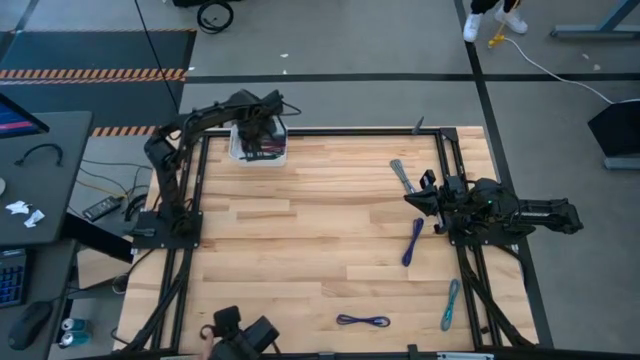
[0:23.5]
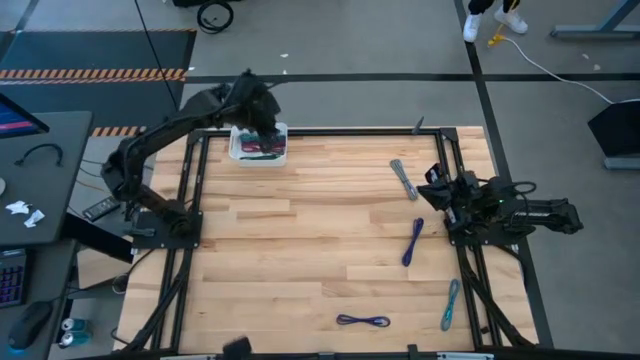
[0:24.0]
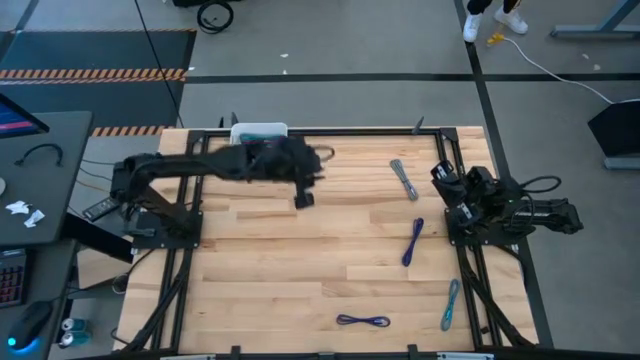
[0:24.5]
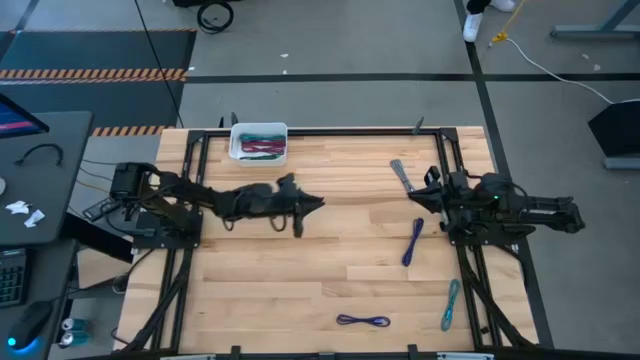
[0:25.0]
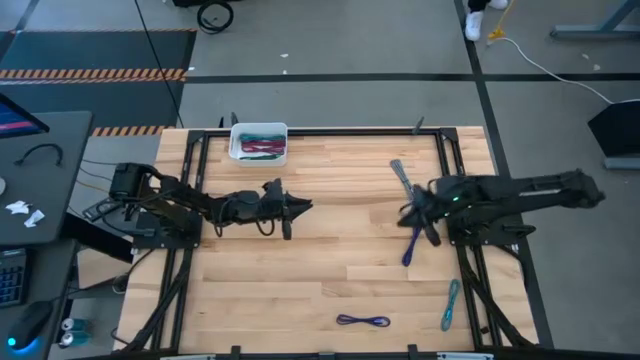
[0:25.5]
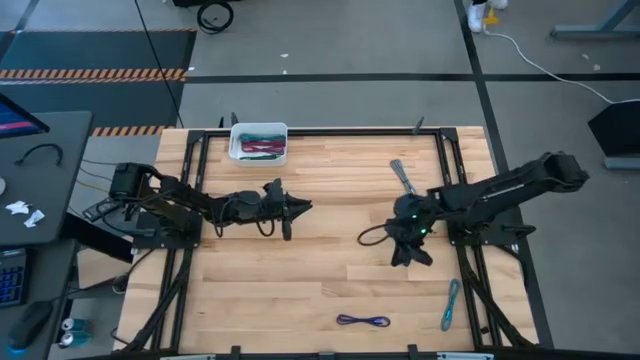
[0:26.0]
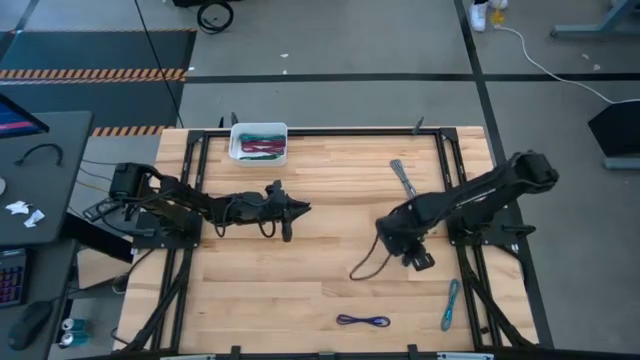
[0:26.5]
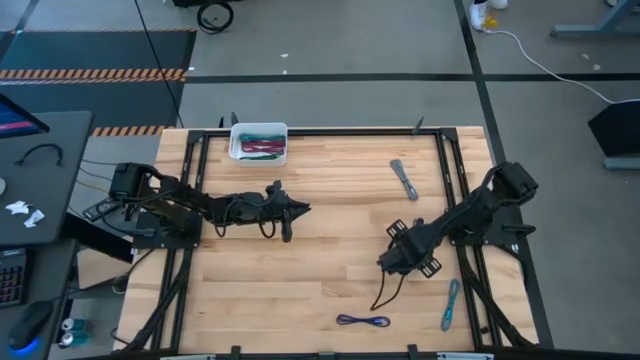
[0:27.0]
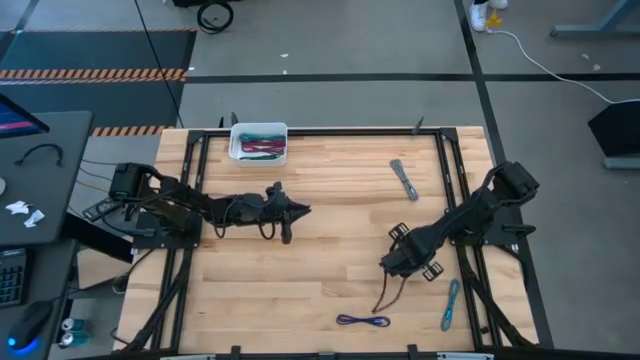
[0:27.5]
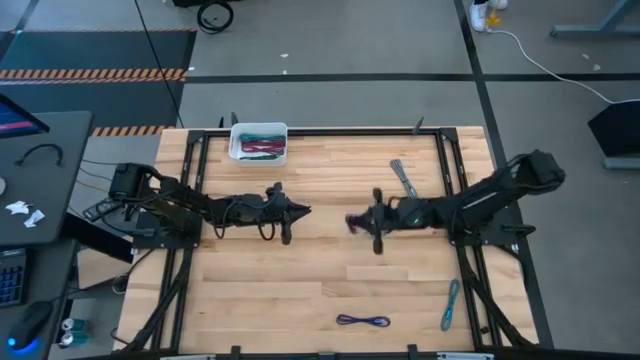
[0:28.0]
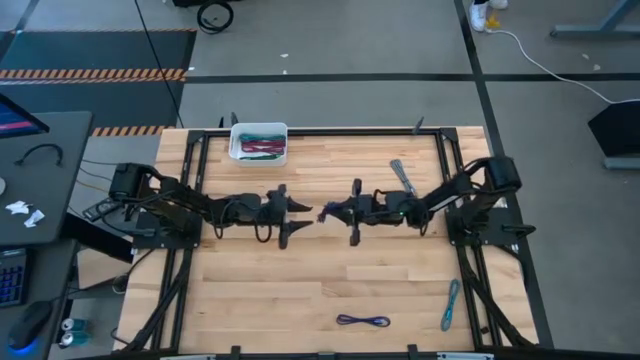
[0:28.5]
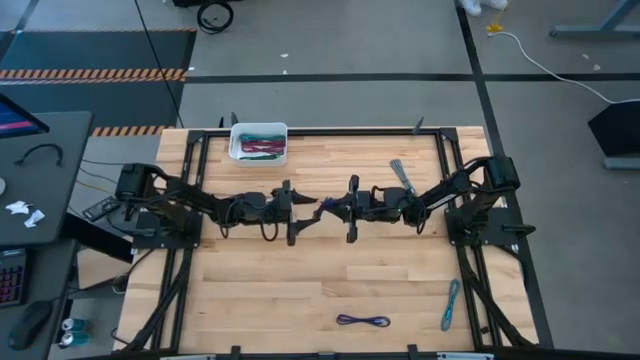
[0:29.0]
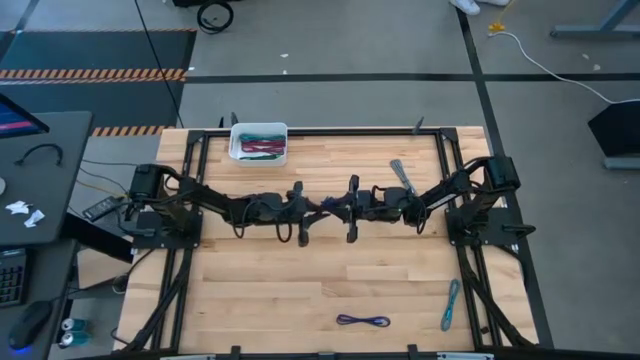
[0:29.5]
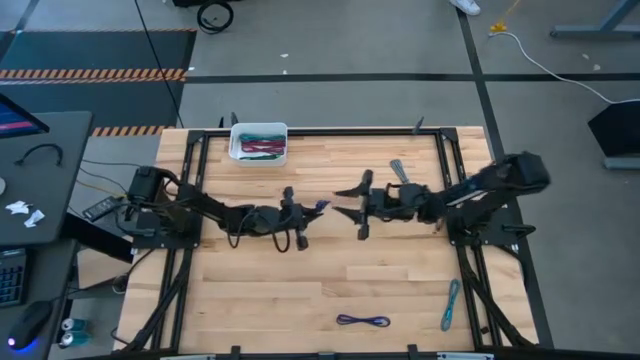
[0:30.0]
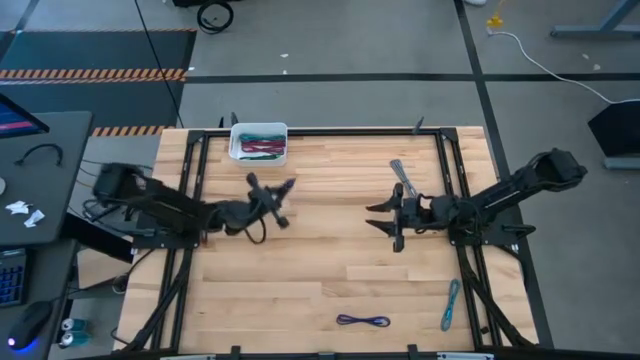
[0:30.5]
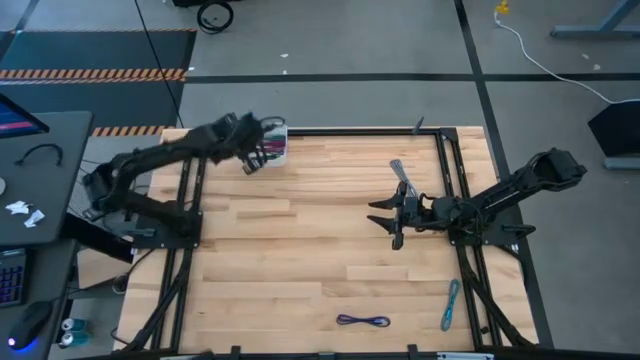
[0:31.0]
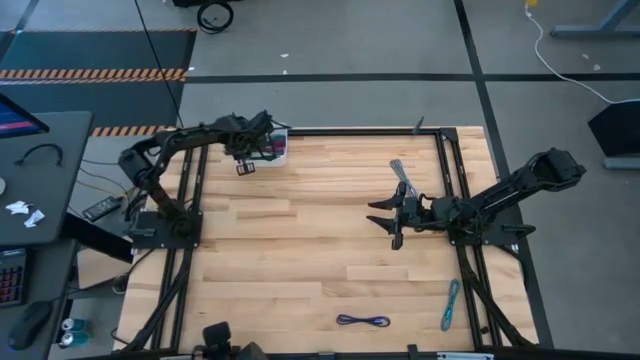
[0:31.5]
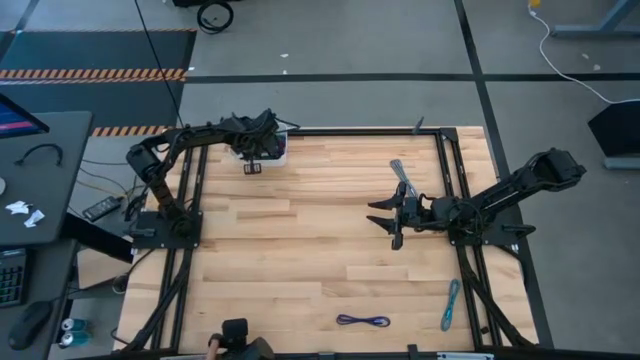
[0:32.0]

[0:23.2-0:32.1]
Task: Pick and place USB-C Cables
Put the top blue USB cable into the white bin

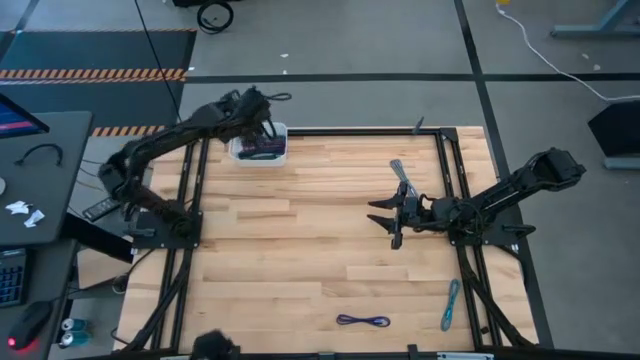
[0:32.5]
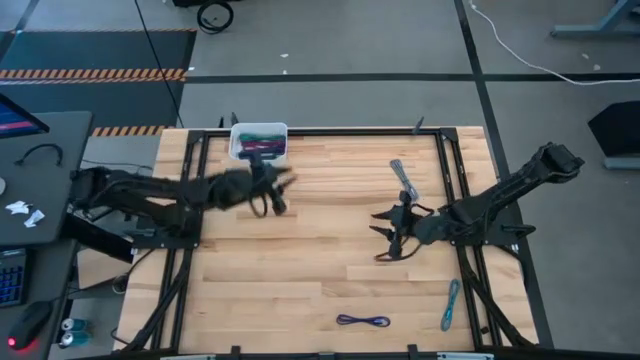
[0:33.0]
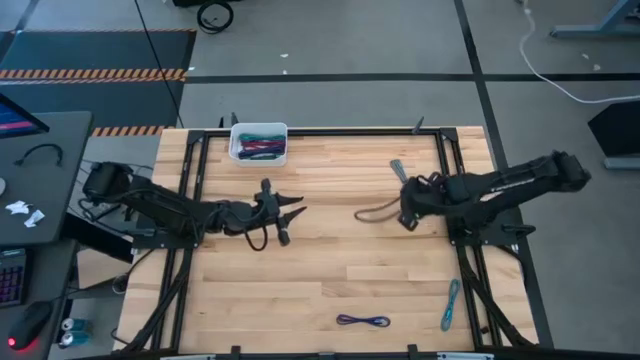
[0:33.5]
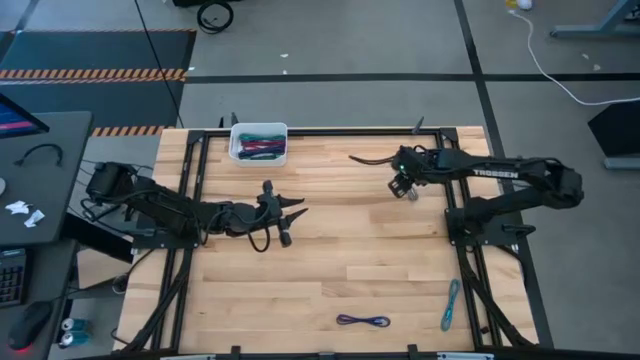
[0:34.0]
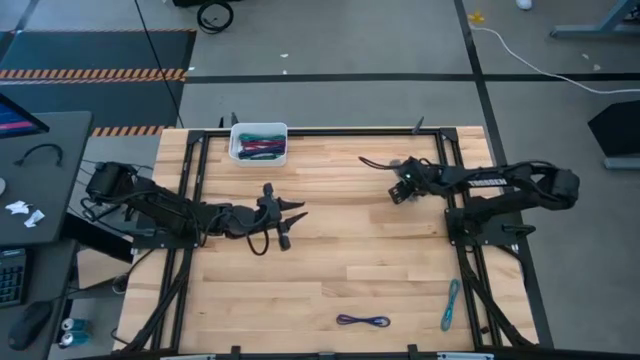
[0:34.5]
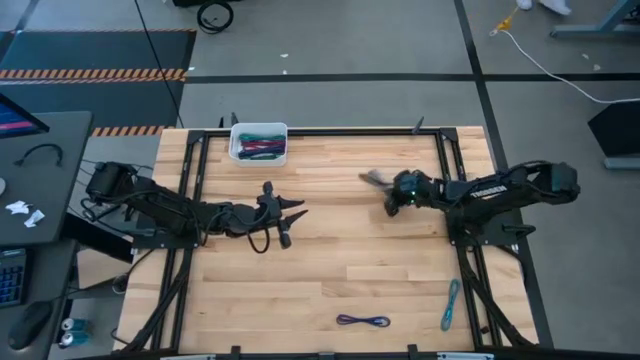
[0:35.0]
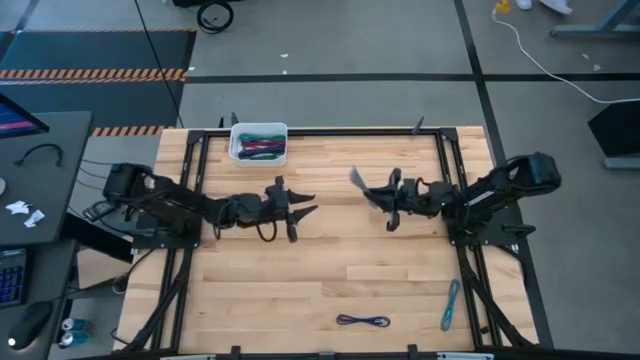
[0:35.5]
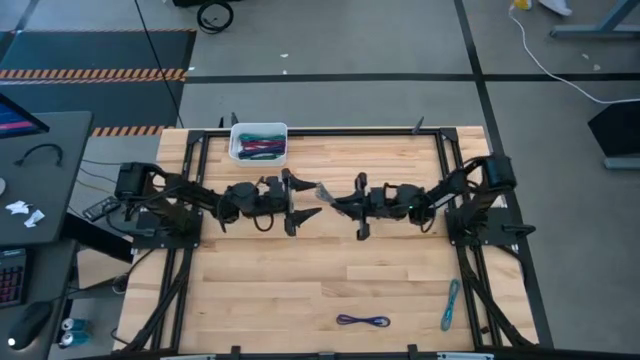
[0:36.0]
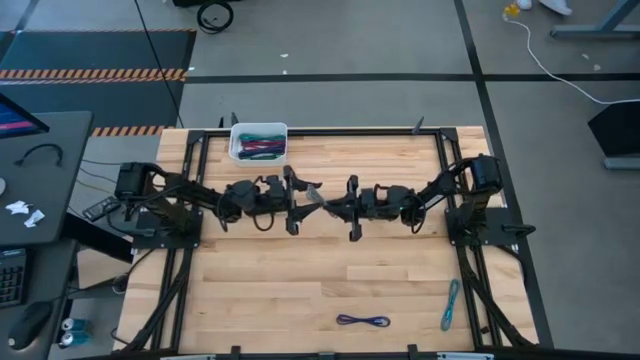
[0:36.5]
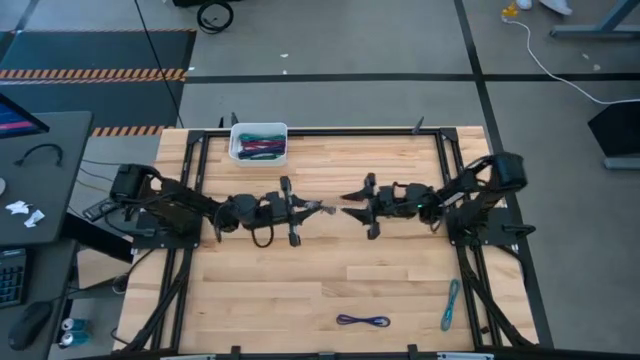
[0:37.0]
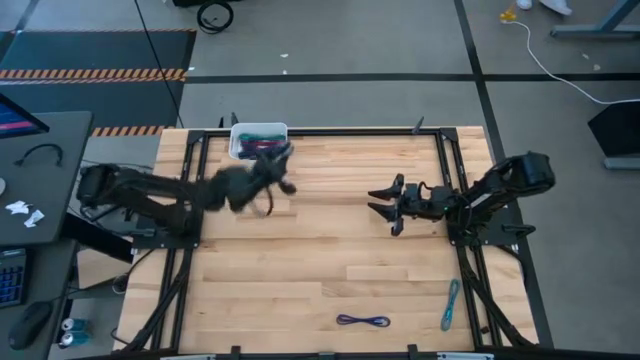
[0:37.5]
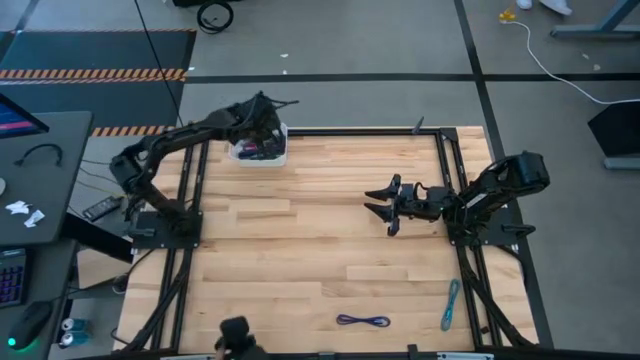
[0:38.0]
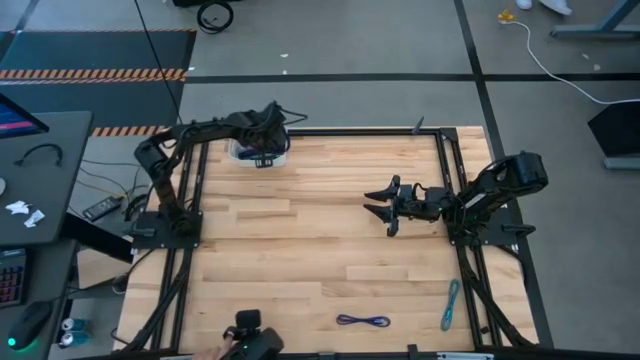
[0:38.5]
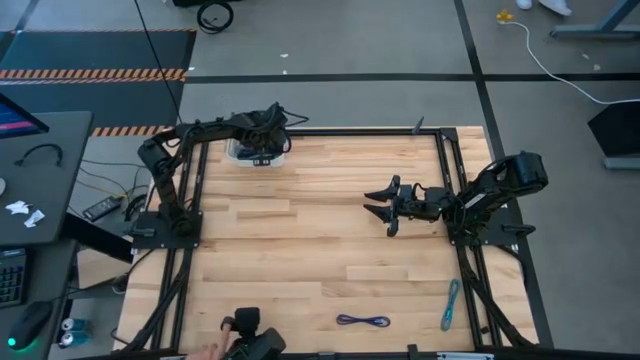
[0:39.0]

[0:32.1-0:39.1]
Put the white USB cable into the white bin

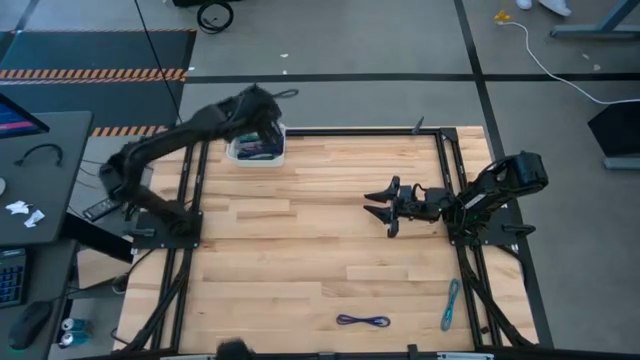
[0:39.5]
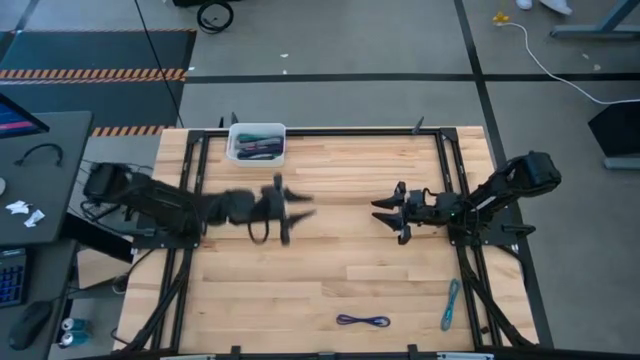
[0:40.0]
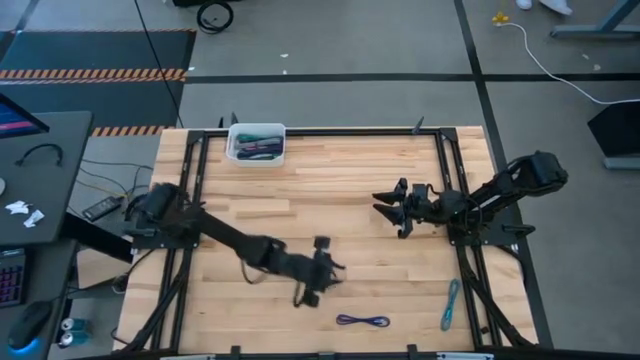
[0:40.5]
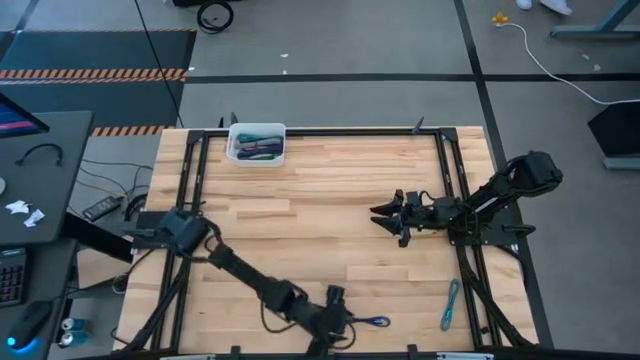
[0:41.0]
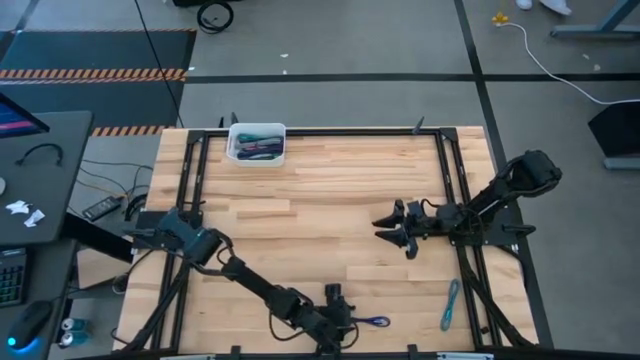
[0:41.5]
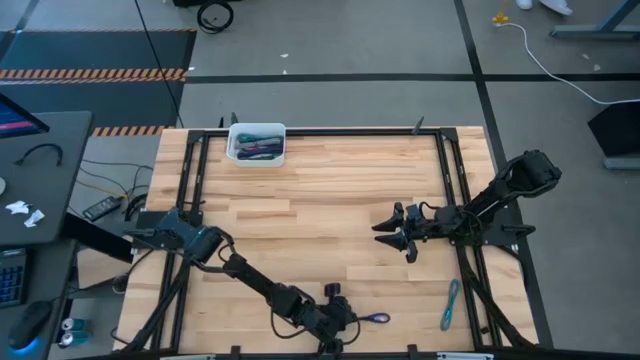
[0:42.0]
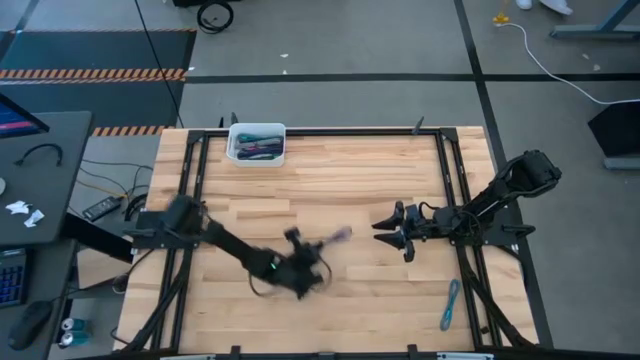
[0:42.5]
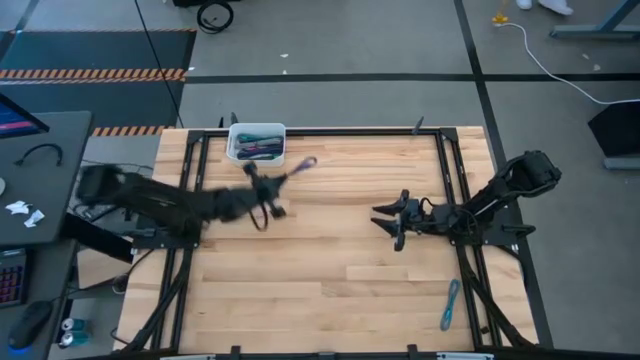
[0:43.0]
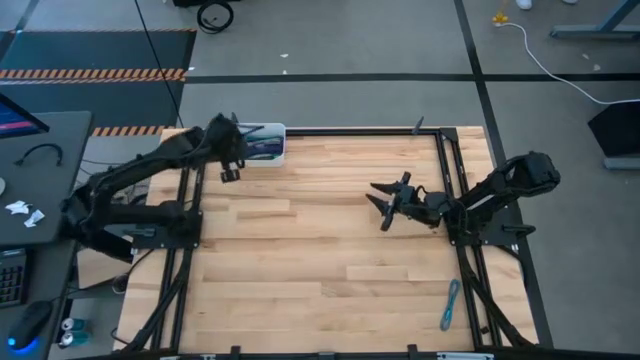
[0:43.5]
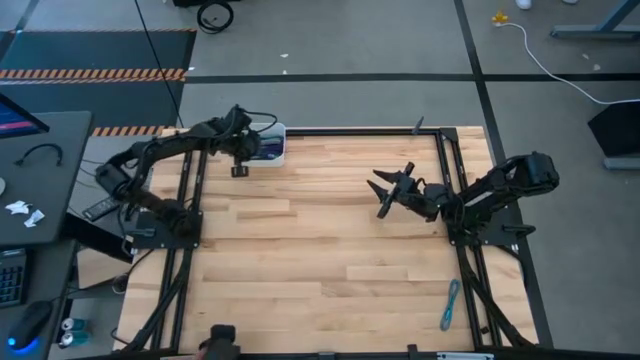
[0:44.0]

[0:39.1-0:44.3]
Put the blue USB cable into the white bin

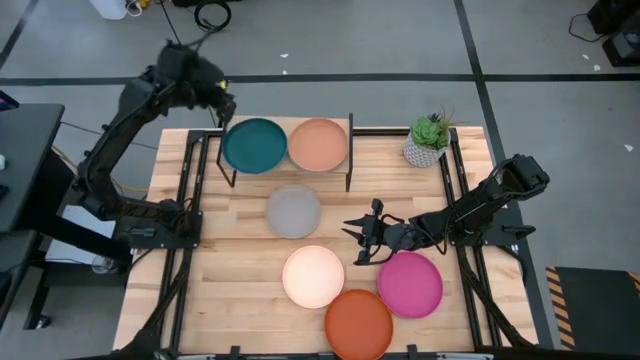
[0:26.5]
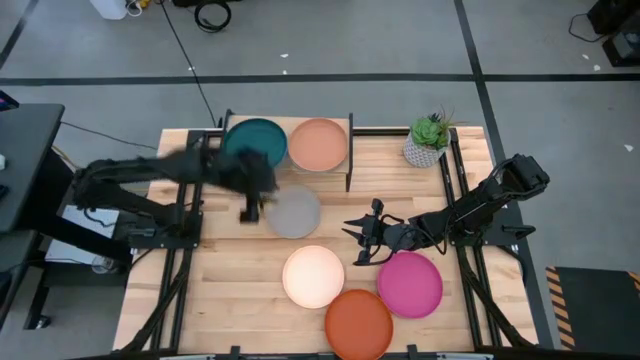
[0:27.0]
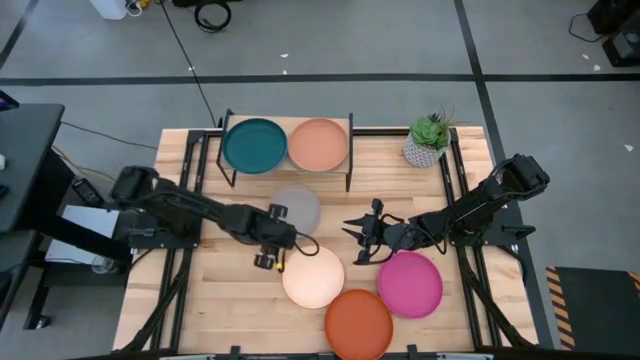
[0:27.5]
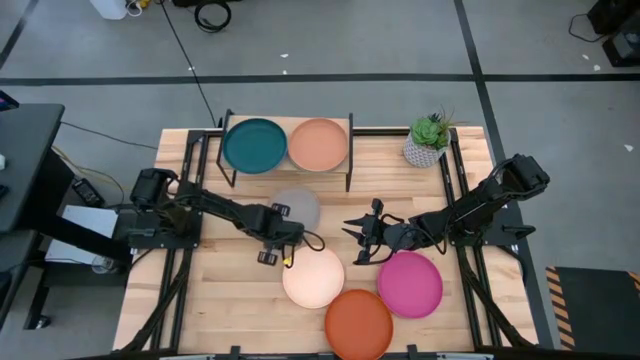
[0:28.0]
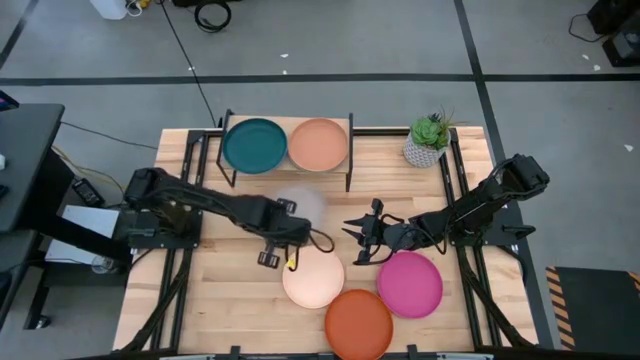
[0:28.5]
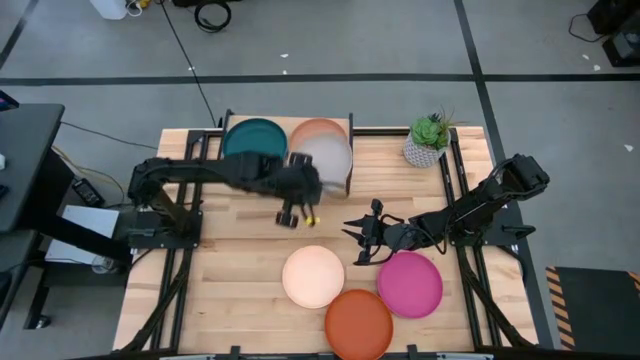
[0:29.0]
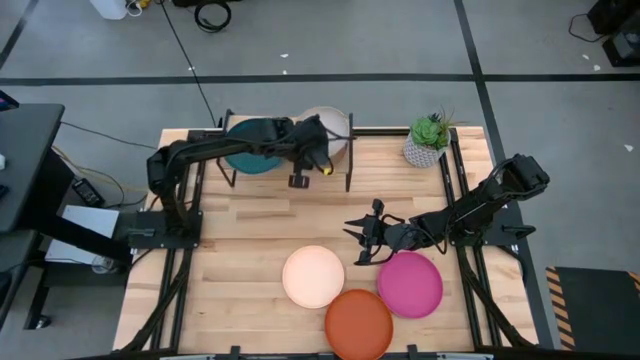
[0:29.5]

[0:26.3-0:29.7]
Task: Place and stack plates onto a shelf
Stack the gray plate on top of the brown plate on the shelf
